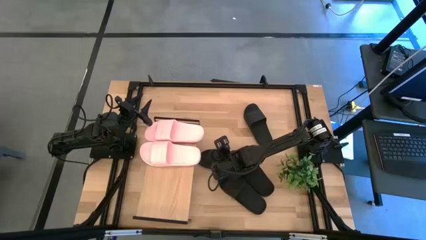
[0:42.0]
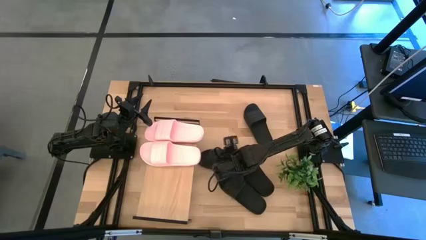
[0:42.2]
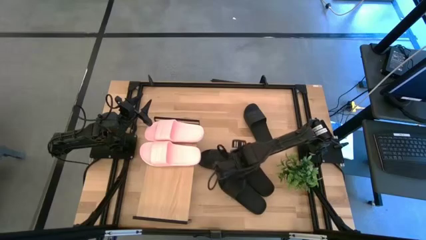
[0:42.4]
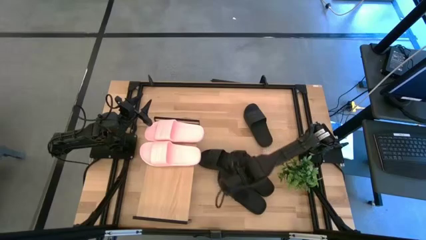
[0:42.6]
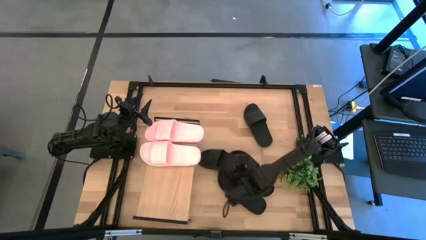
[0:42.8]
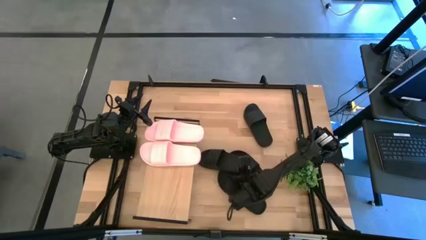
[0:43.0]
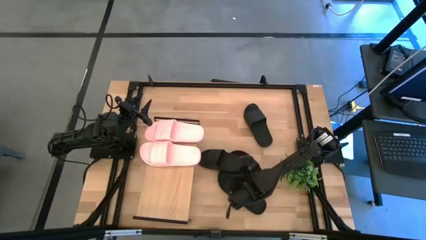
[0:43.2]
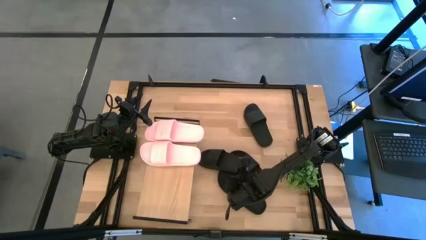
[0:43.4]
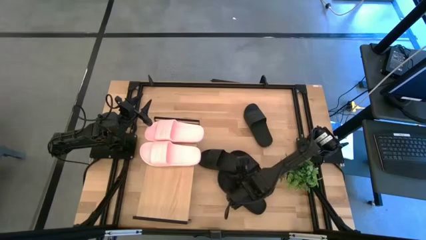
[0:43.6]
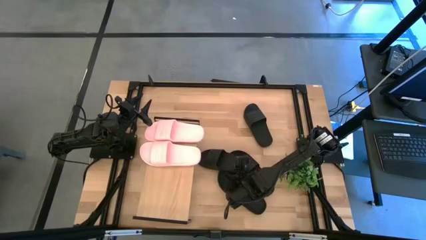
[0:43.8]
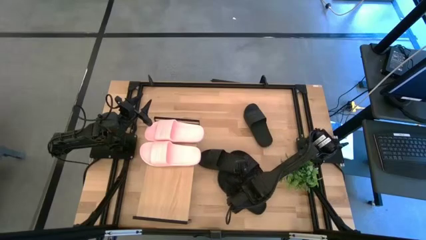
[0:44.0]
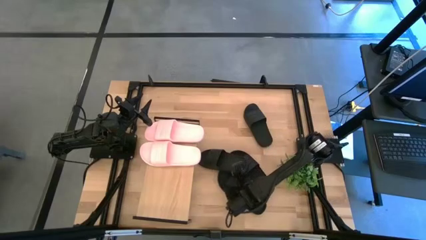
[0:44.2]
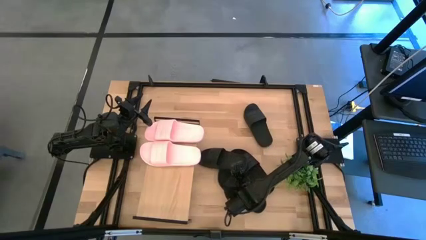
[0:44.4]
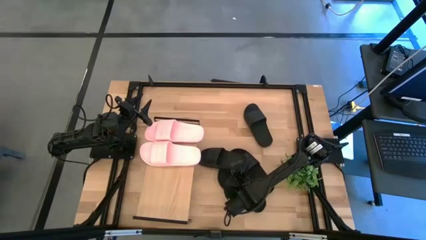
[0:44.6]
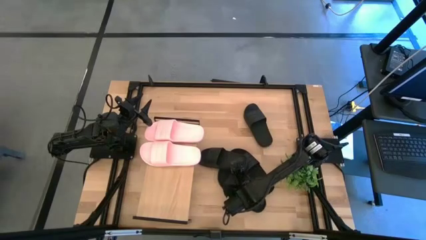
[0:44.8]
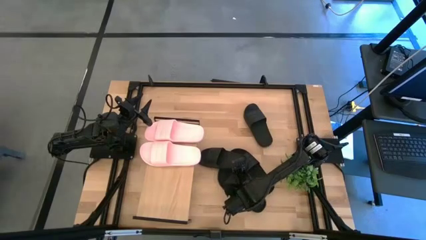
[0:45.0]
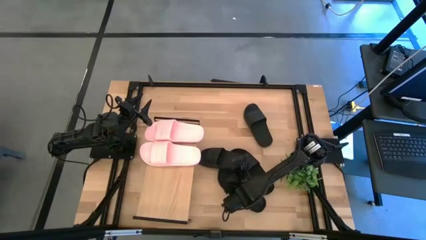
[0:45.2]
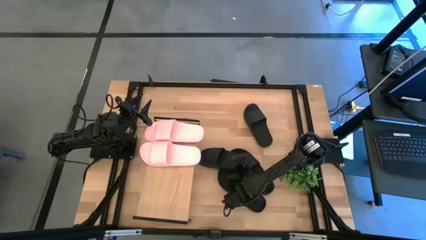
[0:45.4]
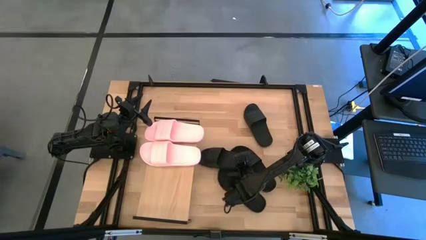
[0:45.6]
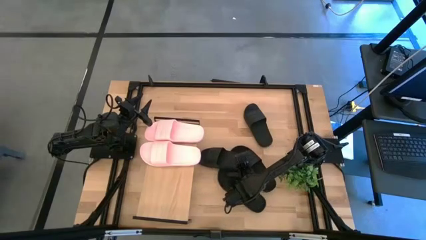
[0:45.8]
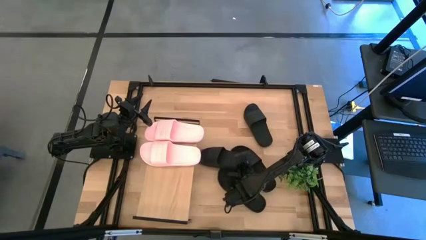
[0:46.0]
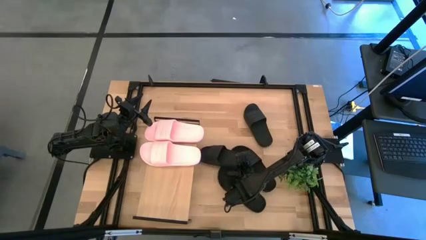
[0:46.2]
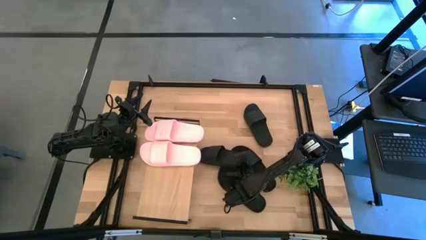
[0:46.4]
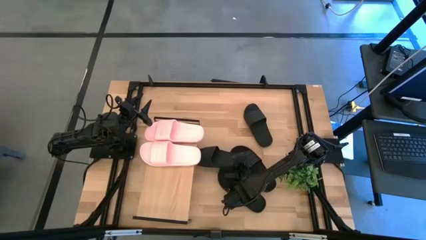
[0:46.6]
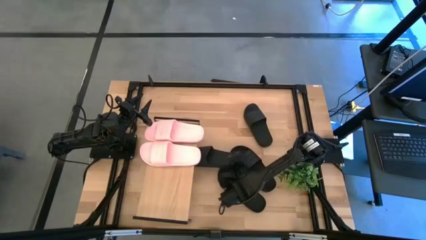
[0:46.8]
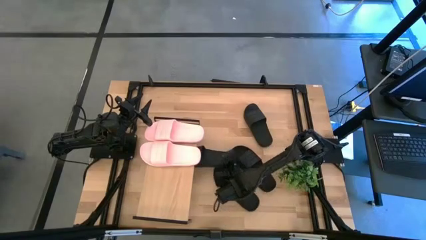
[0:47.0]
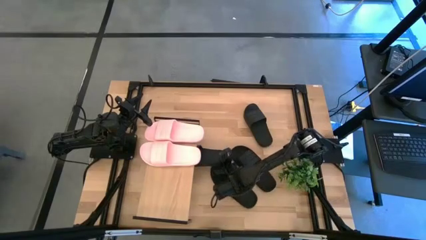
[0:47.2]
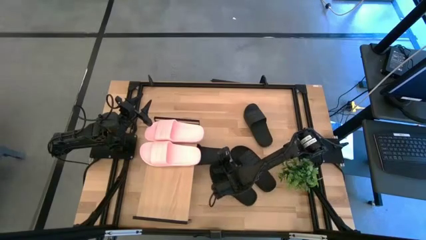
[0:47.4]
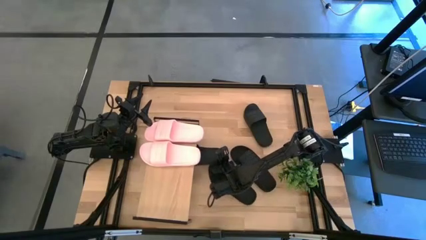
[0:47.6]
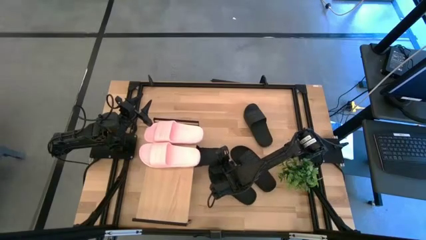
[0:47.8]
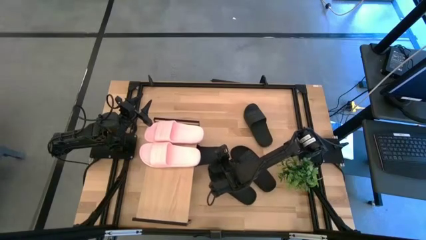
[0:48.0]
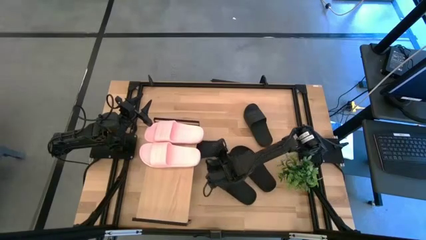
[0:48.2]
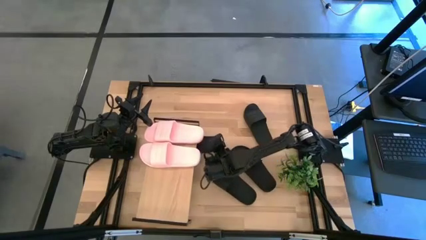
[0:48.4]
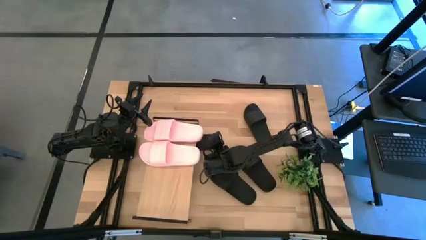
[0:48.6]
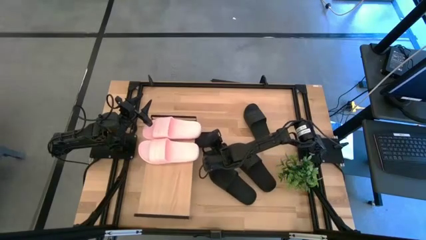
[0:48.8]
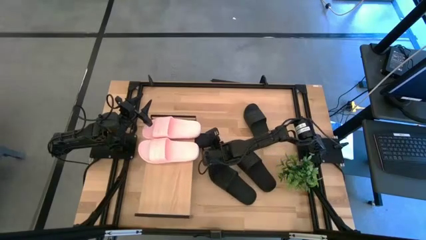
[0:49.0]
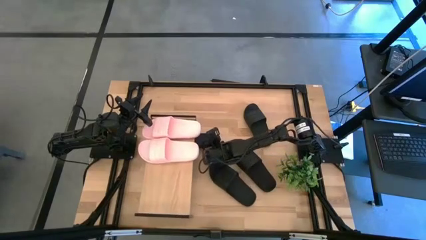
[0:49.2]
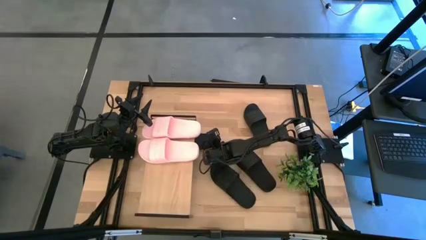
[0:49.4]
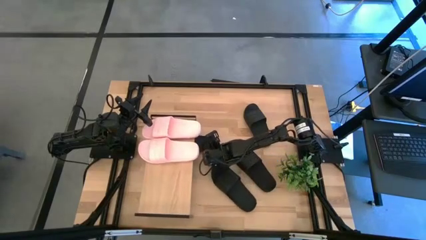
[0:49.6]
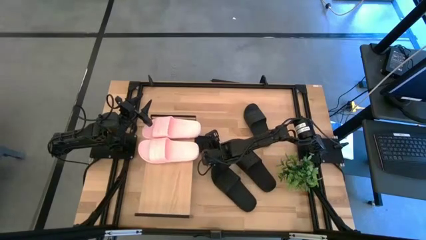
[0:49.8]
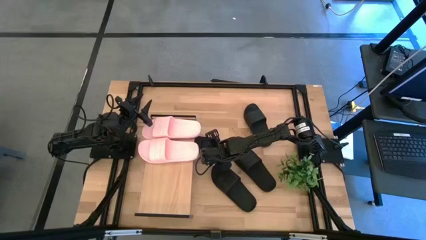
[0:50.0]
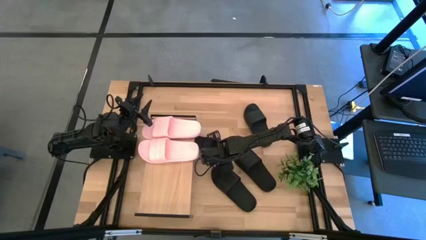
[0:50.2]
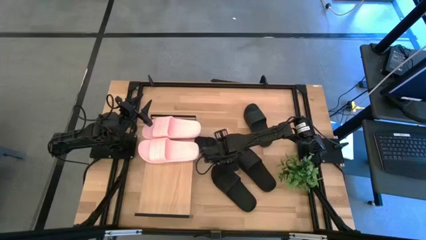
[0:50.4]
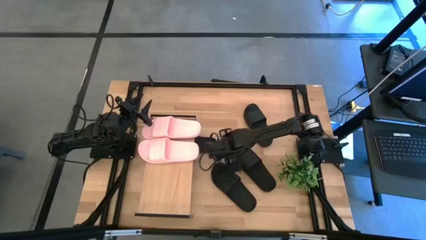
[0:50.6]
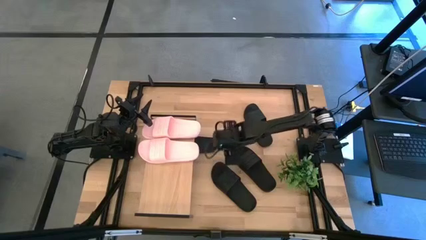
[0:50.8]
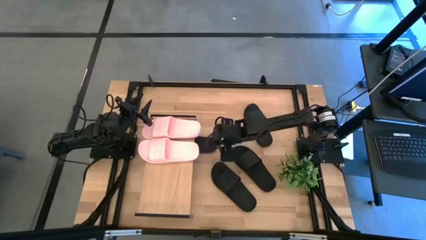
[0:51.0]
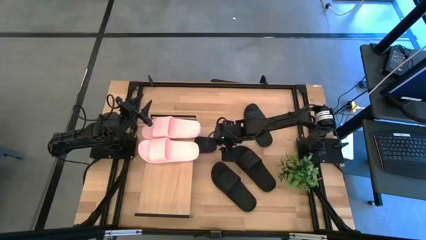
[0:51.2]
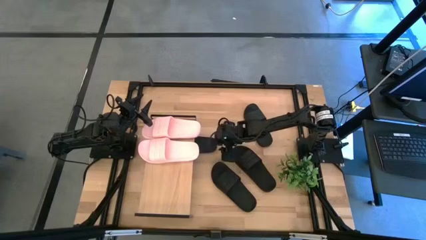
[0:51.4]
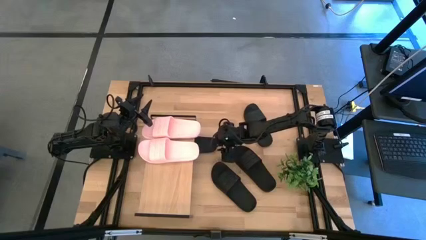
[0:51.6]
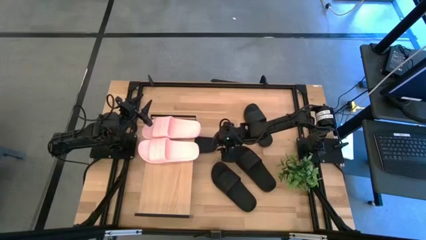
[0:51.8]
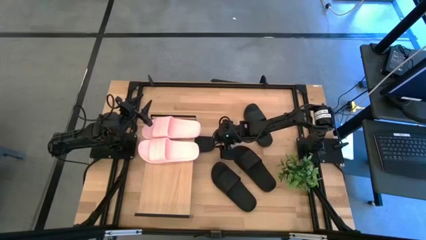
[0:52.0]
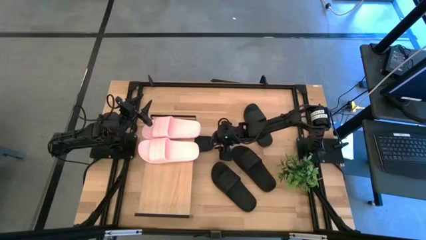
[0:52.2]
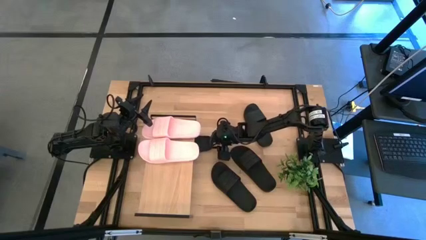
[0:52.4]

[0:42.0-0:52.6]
Task: Pick and place slides into the shelf
Put the black slipper under the shelf

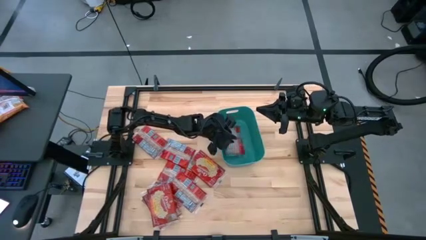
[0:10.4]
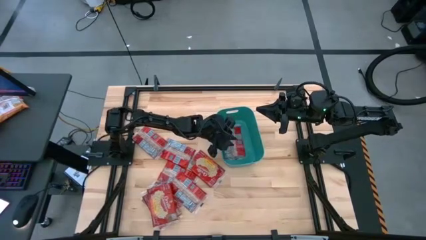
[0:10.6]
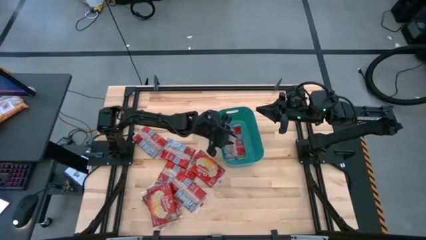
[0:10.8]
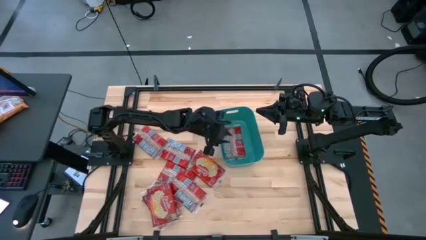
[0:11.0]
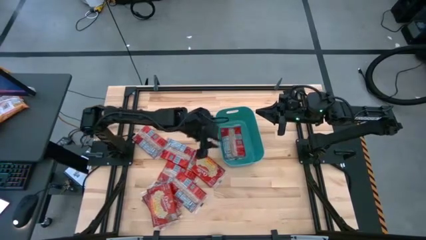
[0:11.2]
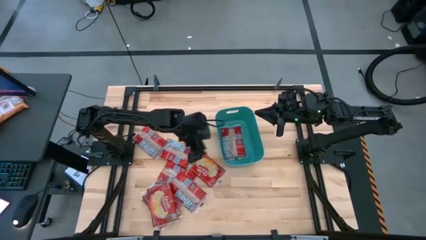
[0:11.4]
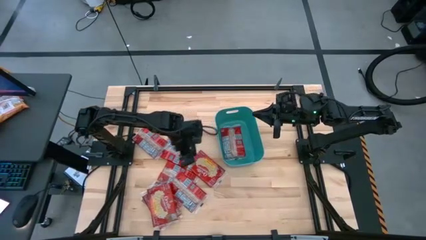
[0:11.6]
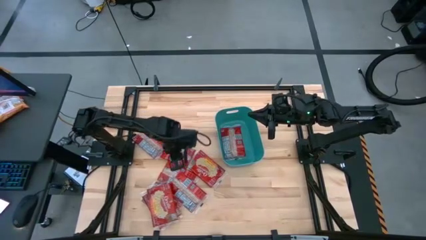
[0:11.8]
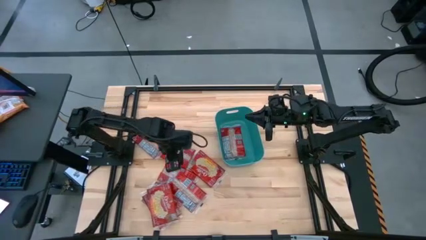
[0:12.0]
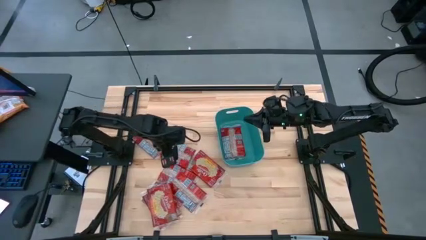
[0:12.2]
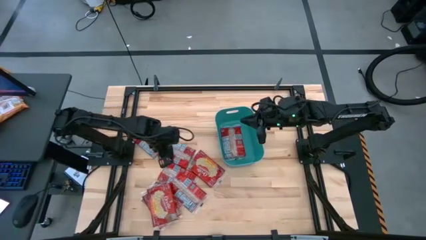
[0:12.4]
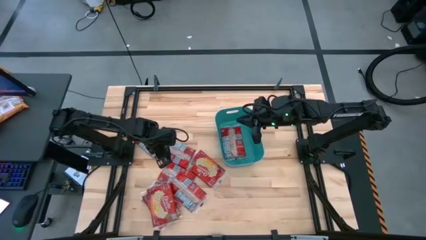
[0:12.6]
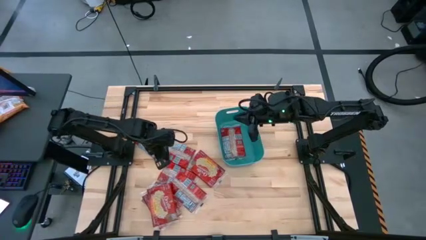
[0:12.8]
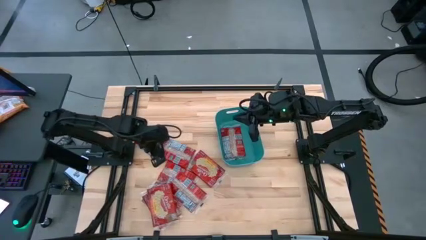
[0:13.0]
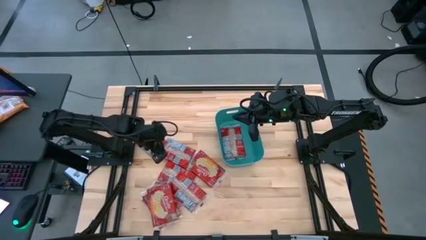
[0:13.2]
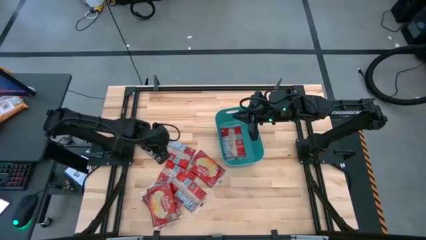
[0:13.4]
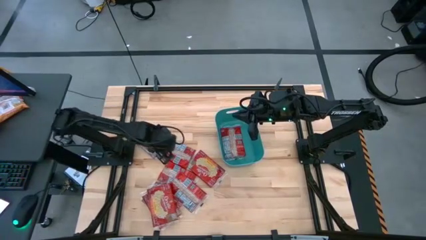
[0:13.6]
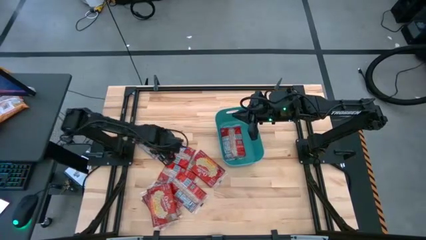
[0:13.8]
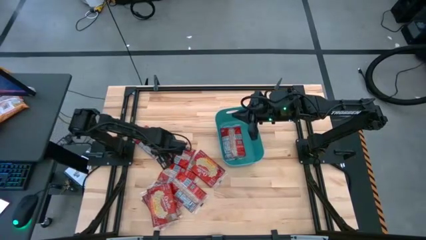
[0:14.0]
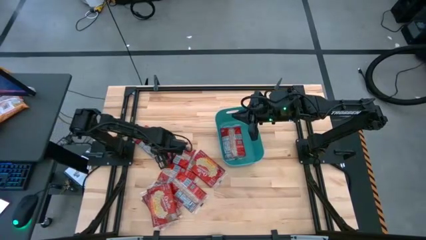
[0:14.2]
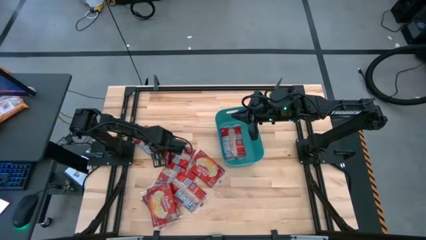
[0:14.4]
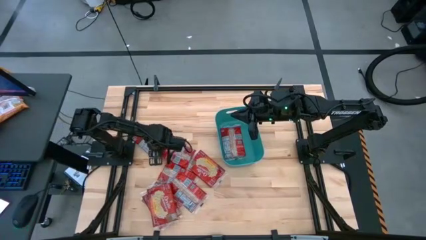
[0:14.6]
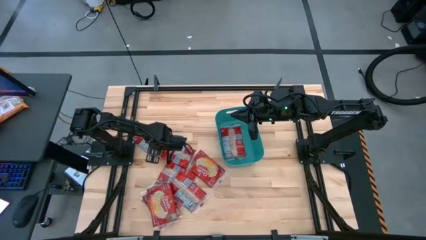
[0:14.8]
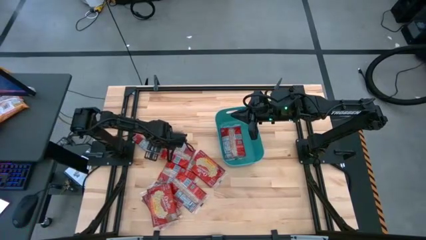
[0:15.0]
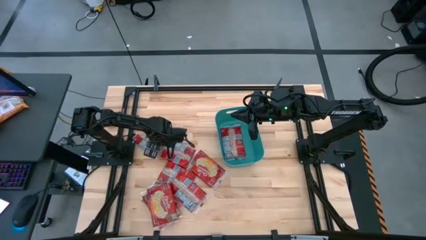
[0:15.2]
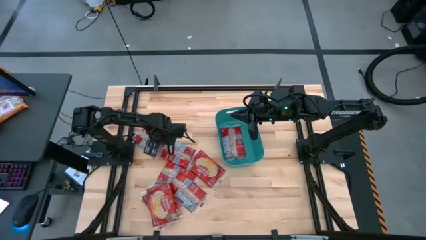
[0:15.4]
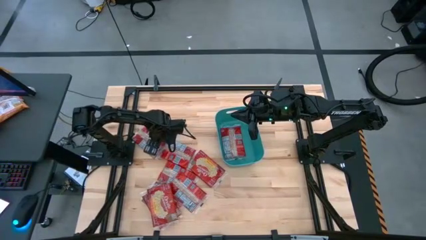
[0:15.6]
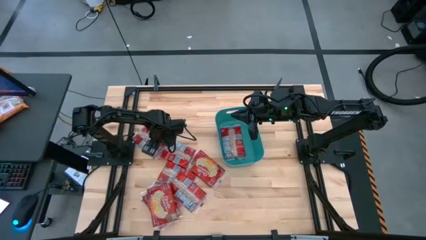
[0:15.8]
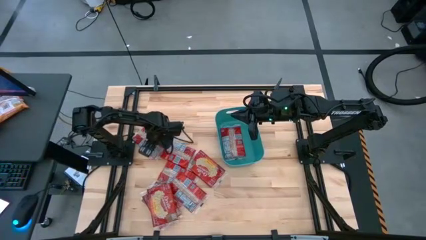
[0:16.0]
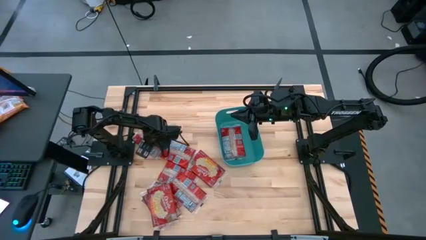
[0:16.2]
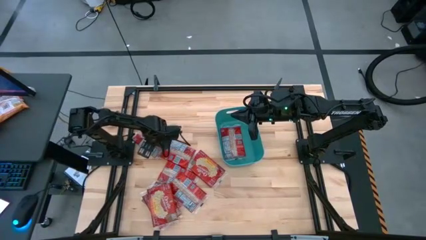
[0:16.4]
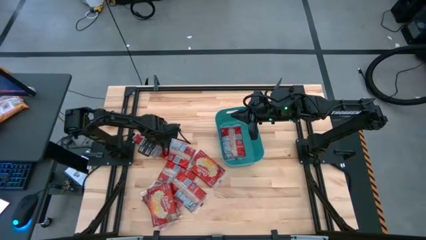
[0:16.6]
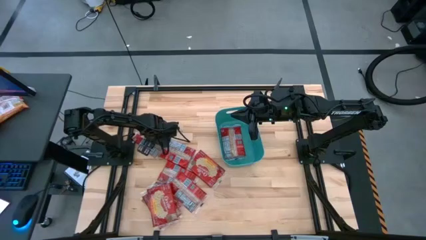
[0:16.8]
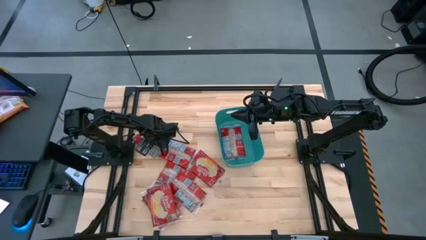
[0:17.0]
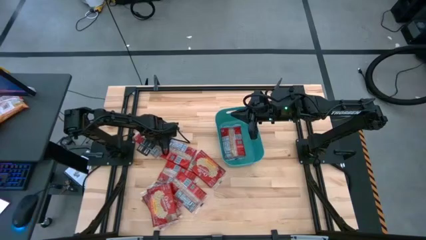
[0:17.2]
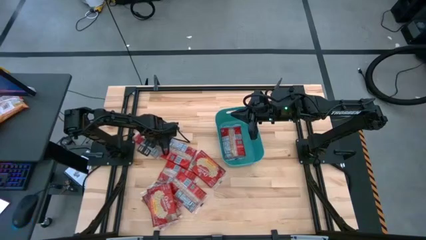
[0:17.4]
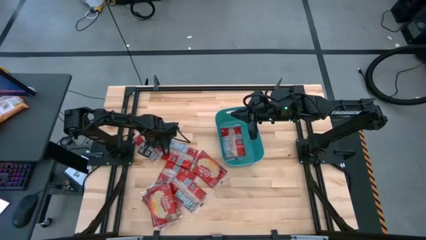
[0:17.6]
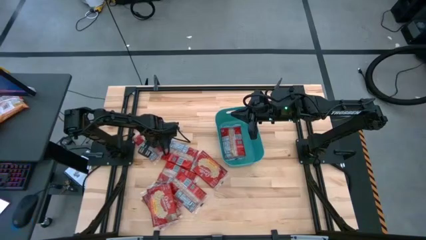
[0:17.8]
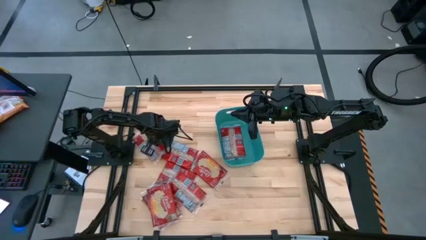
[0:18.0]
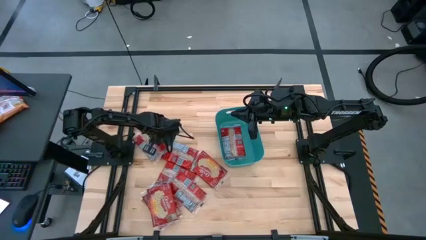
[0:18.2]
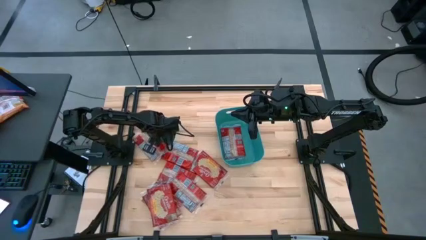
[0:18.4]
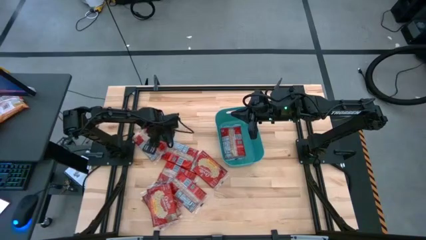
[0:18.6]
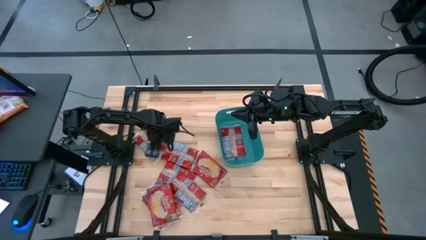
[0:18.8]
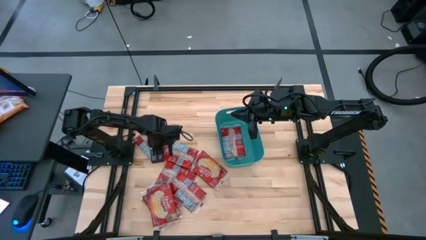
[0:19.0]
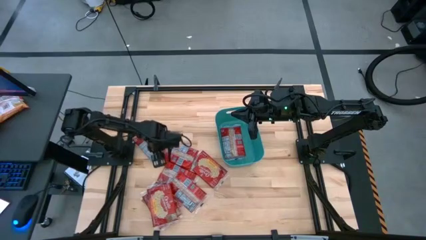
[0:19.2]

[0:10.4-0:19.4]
Task: Sort popcorn bags into baskets
Put the red popcorn pack into the green bin
